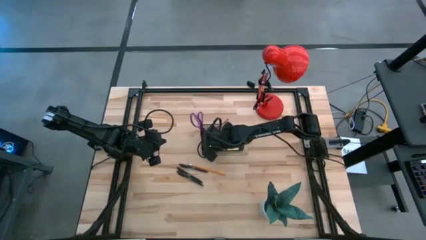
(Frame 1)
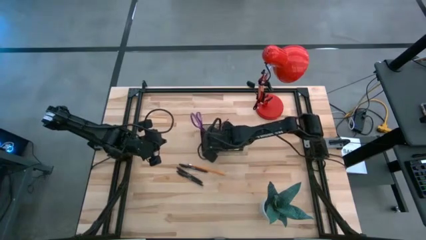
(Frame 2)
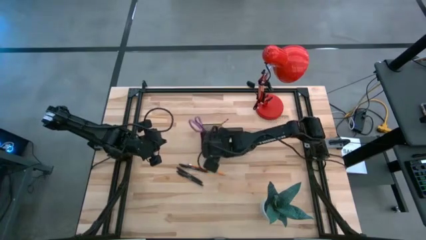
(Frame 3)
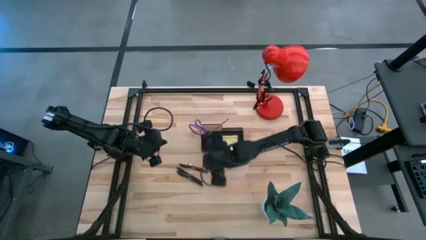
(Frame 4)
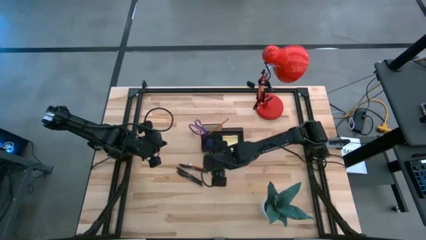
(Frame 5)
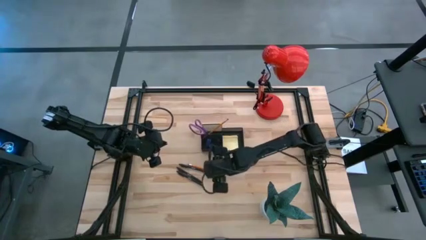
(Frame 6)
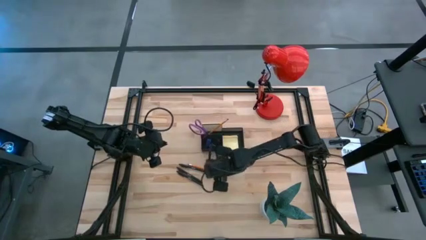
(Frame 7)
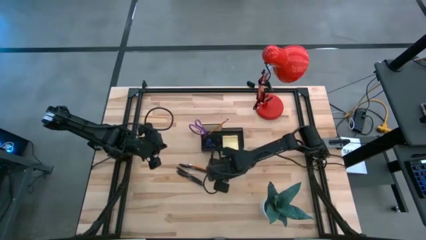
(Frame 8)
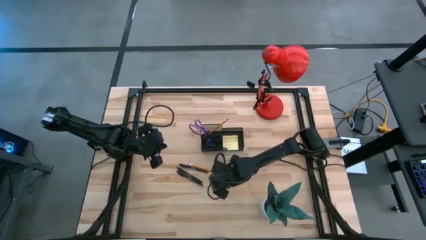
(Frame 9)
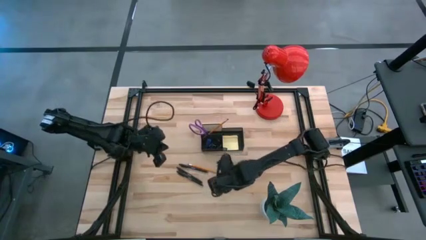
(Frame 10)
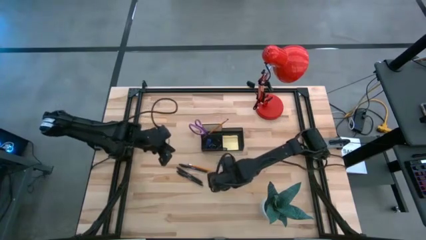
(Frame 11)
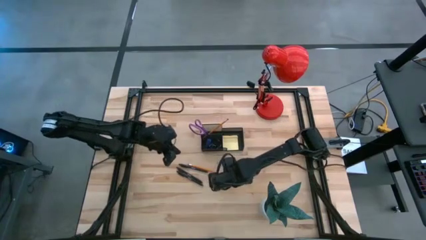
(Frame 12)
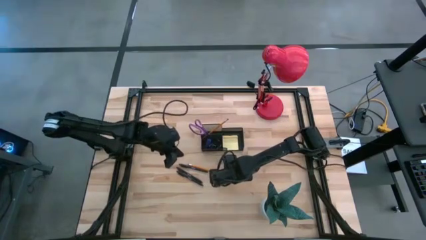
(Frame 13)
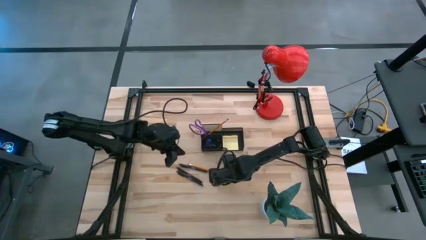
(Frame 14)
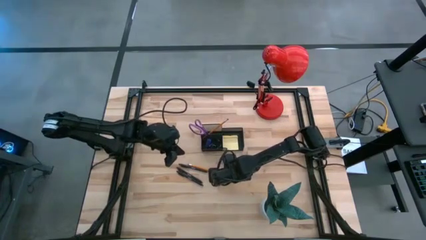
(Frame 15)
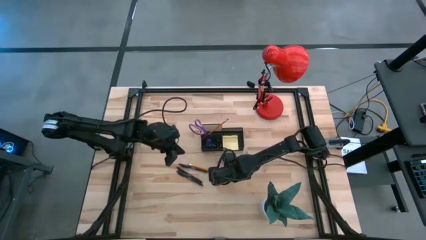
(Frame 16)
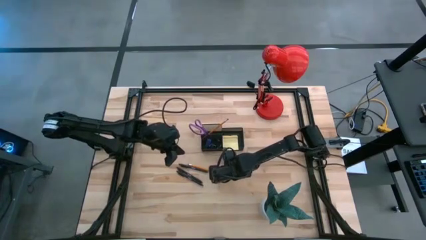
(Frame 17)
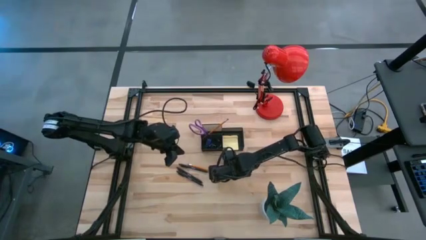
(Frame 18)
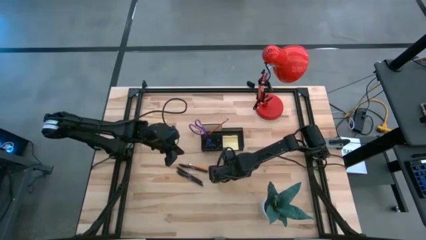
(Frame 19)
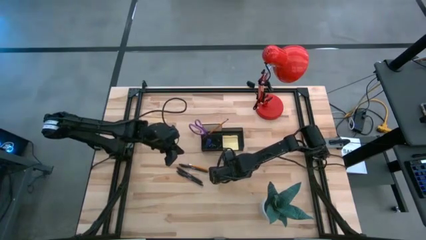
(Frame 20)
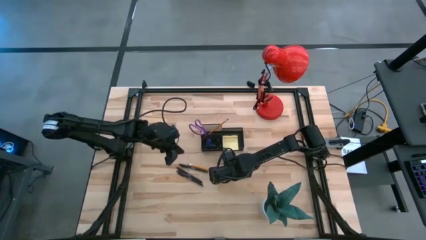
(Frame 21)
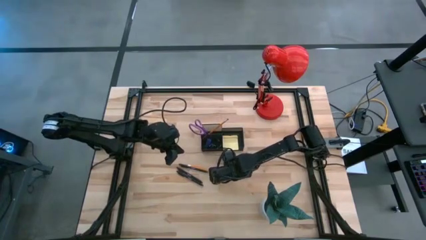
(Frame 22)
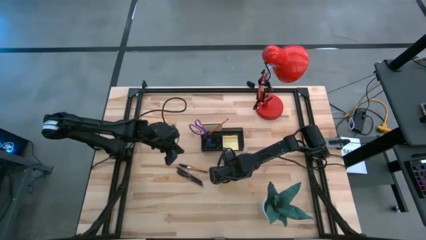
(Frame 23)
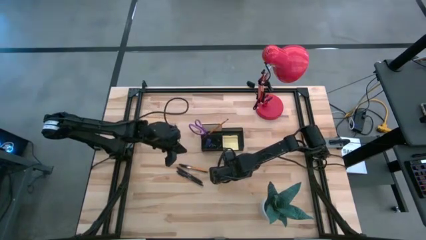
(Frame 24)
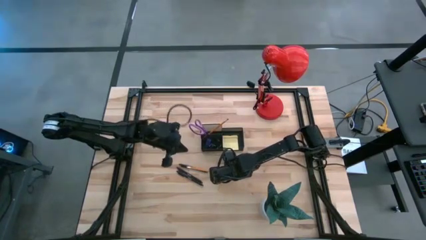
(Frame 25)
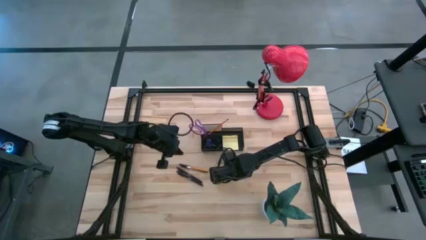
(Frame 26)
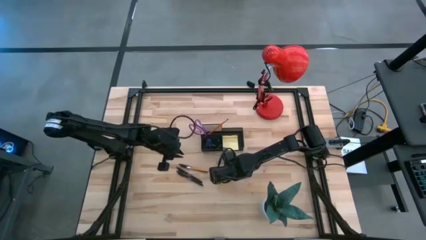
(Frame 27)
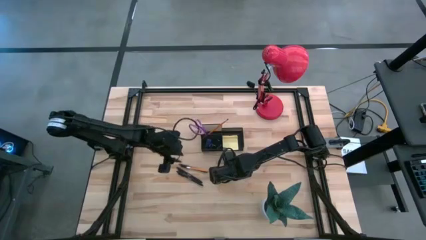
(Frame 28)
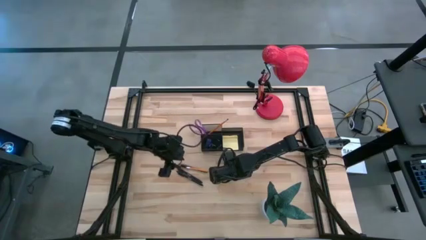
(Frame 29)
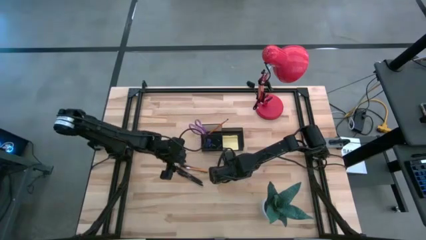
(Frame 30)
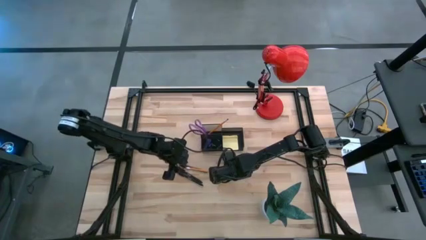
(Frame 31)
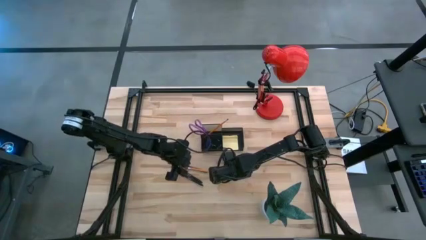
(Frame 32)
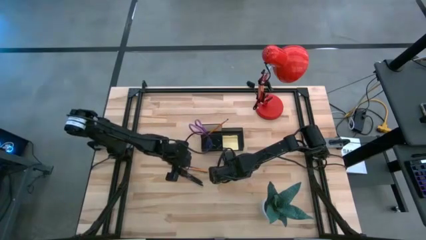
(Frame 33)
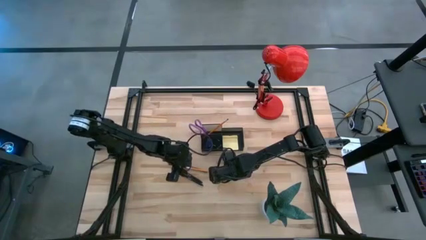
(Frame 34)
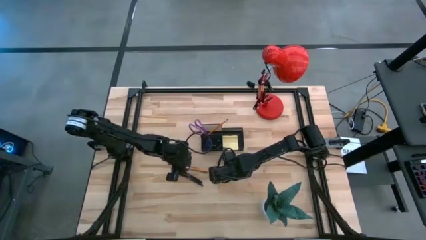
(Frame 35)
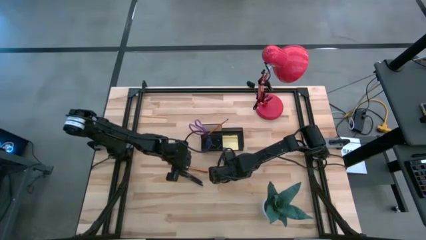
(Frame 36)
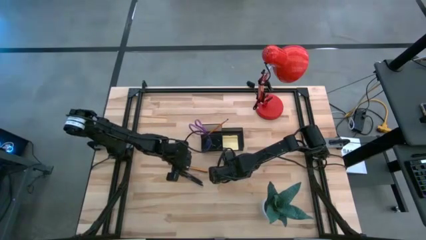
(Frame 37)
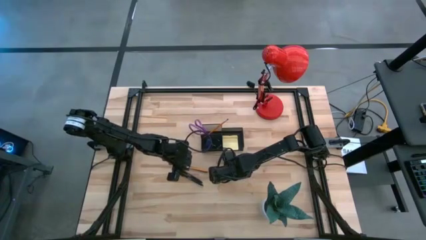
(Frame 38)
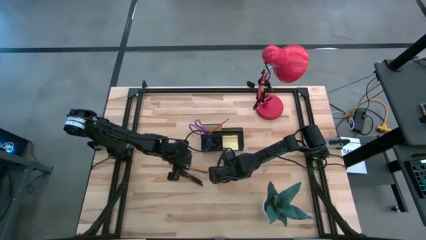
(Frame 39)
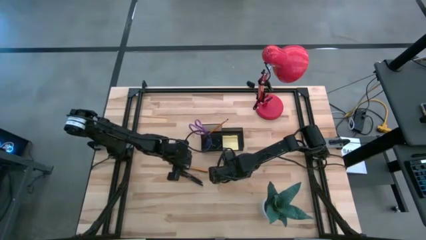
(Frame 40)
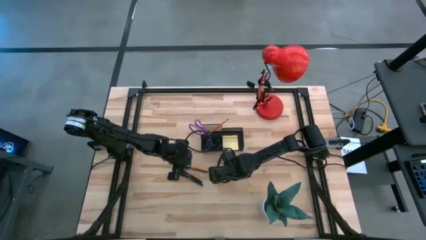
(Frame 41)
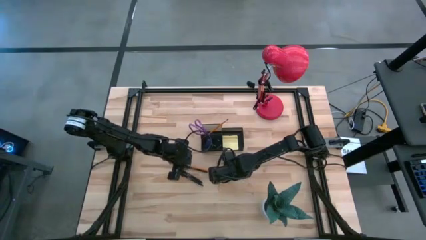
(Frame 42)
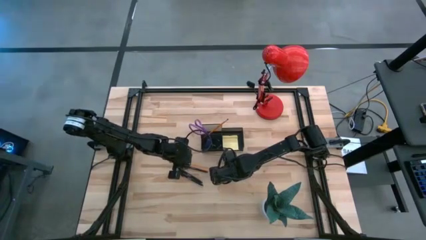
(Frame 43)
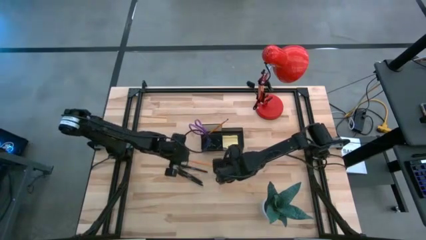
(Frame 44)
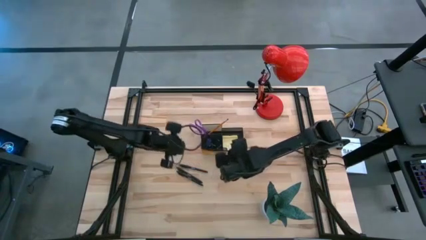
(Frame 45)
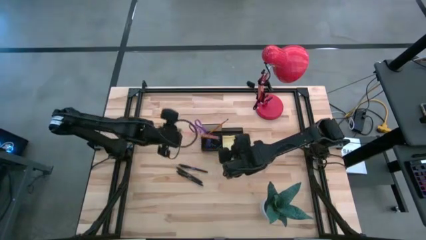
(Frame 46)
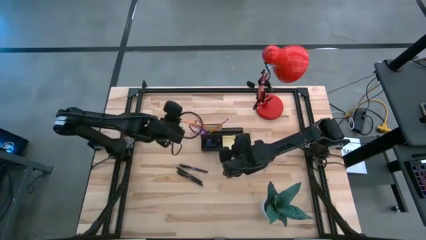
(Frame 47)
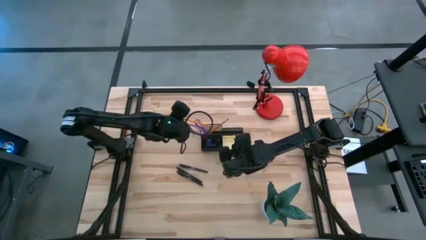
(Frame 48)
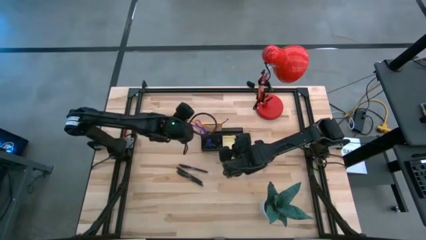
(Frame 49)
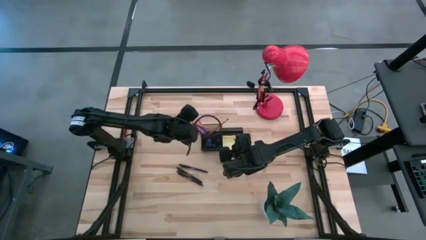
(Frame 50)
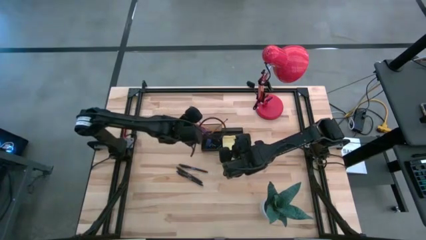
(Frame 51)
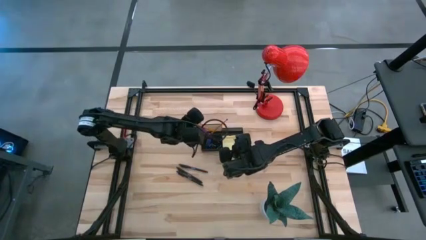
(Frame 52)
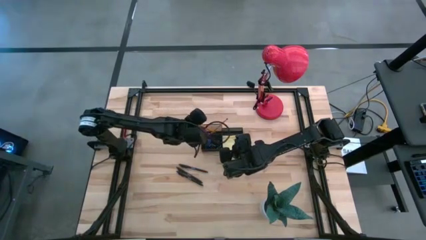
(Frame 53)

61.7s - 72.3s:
Task: Pick and place office supplies into organizer
Put the orange pencil into the black desk organizer

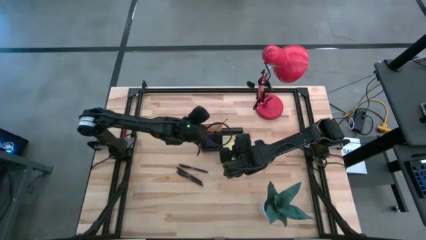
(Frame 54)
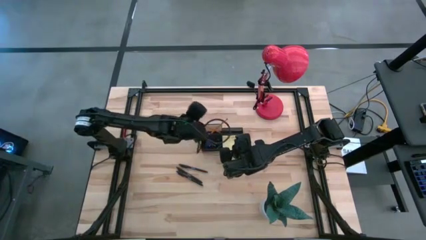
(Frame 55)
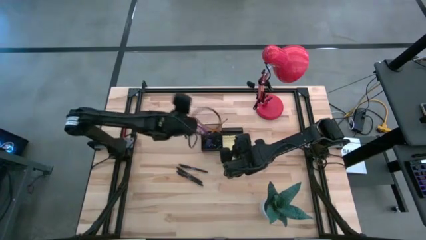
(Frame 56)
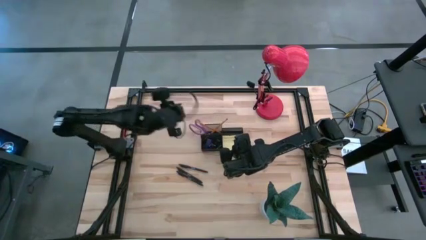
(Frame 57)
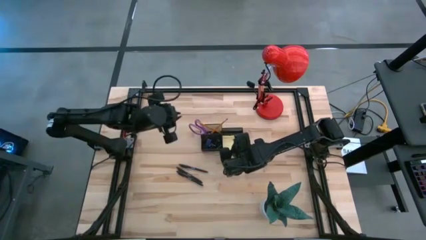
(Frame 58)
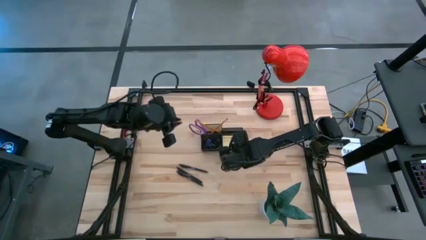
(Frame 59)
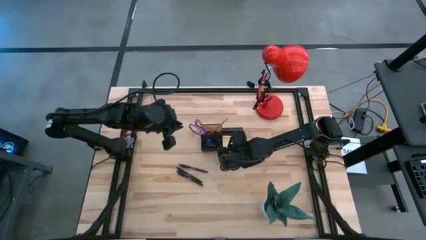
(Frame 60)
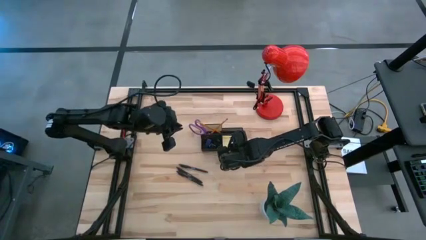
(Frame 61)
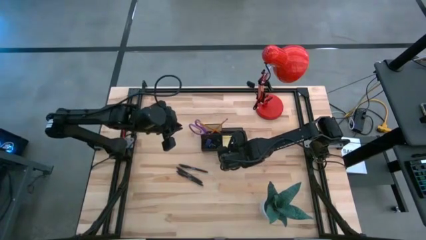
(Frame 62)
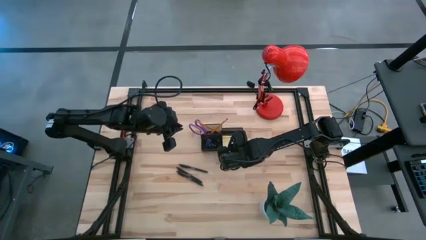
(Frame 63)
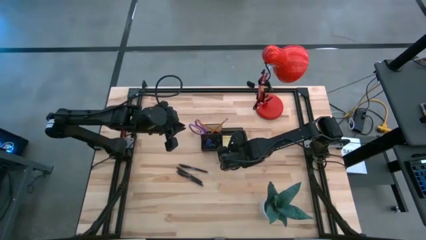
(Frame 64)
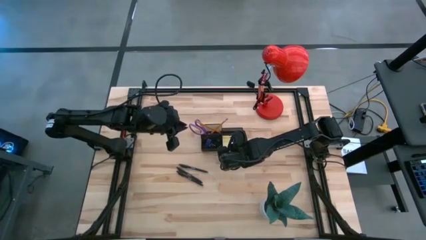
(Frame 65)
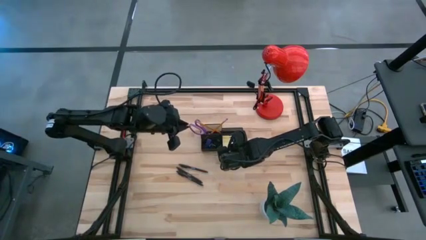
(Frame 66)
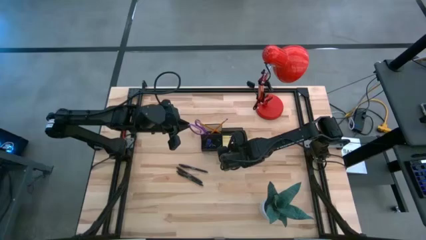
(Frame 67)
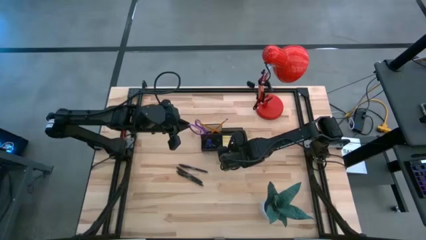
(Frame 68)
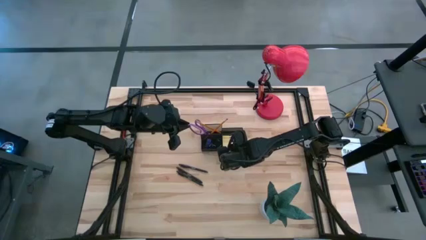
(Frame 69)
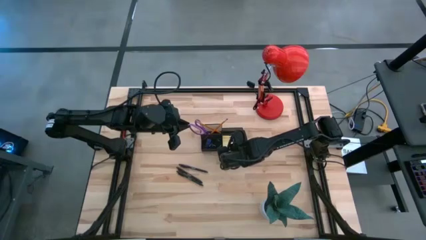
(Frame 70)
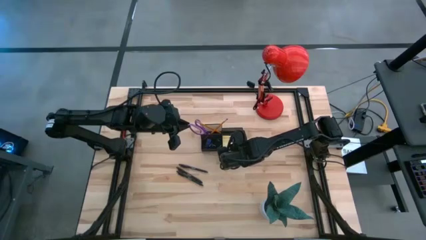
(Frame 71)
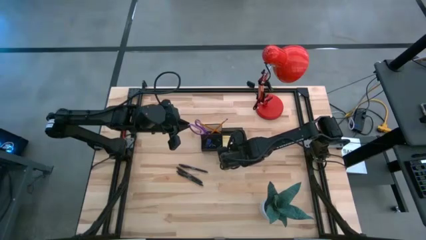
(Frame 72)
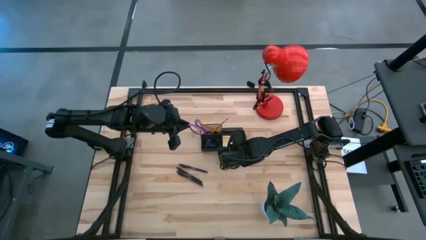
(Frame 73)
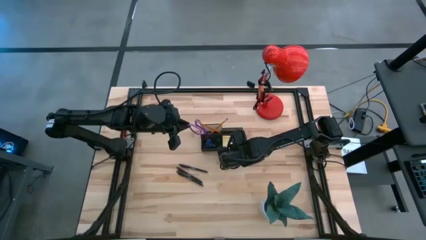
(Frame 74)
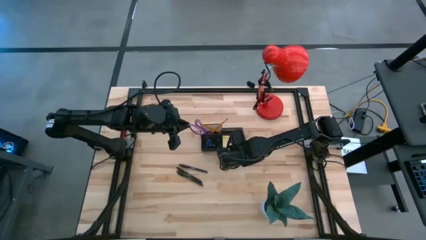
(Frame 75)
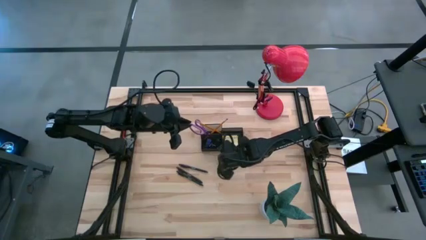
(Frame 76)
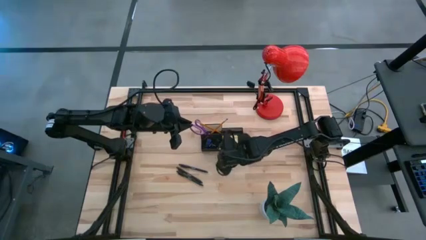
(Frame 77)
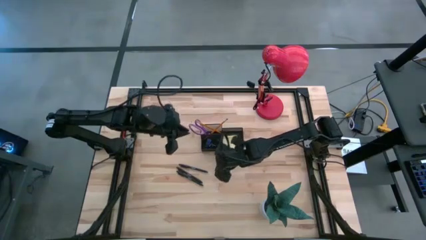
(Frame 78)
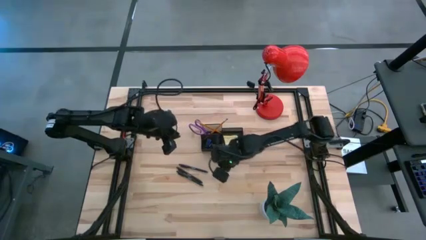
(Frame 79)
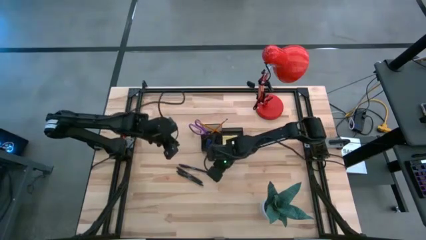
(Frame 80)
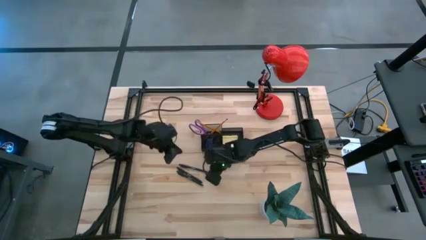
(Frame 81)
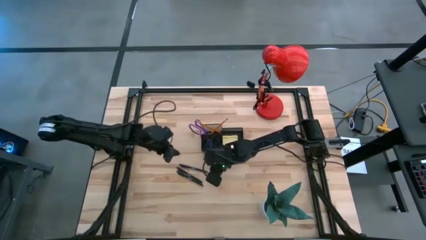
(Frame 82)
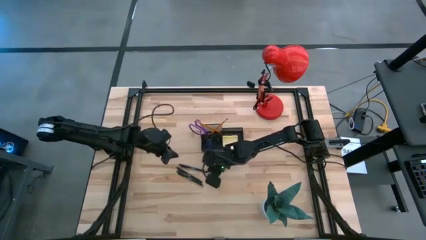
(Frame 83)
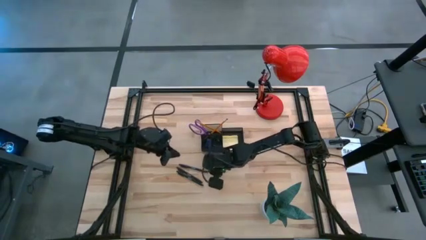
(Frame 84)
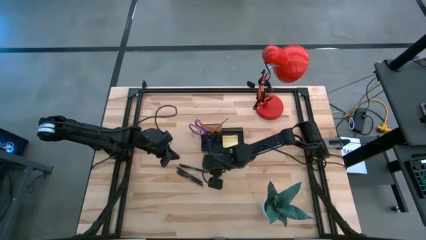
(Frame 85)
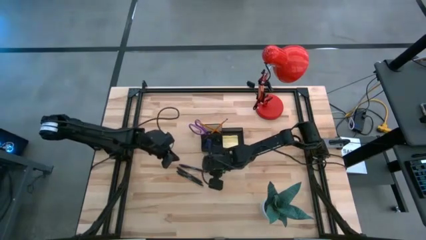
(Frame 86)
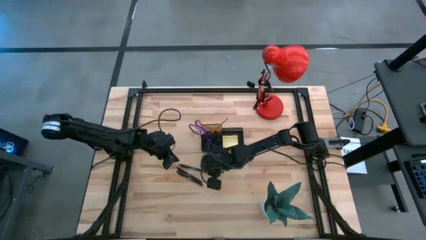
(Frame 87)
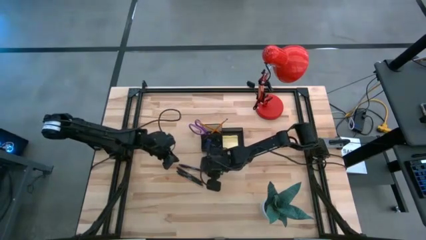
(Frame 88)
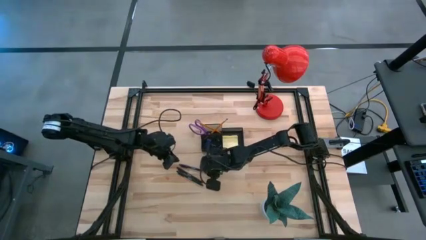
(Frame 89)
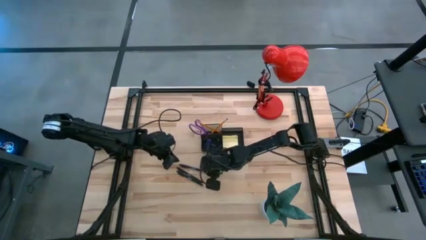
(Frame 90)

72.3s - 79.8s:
Put the top black pen into the black desk organizer
